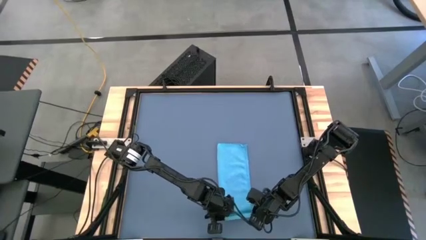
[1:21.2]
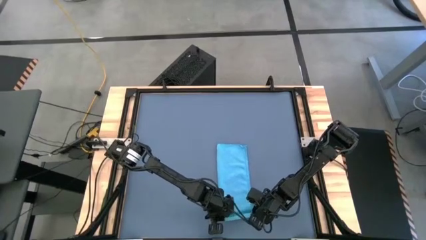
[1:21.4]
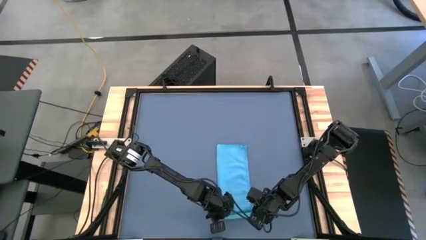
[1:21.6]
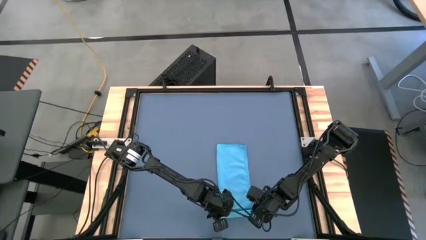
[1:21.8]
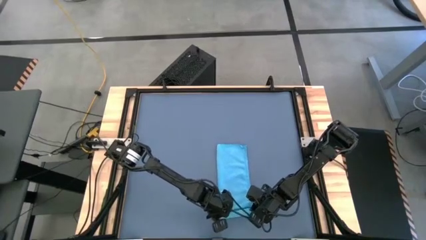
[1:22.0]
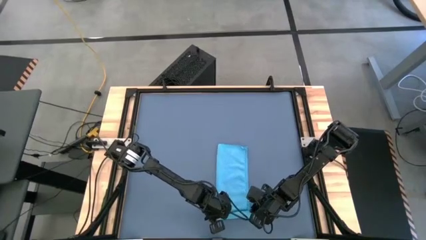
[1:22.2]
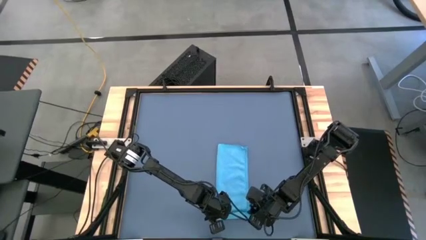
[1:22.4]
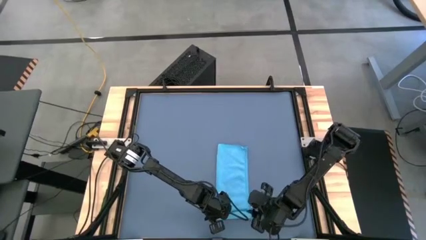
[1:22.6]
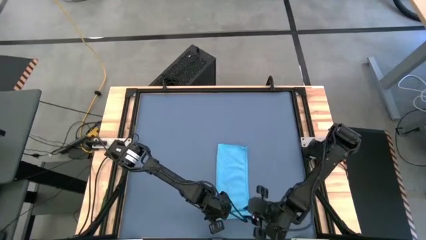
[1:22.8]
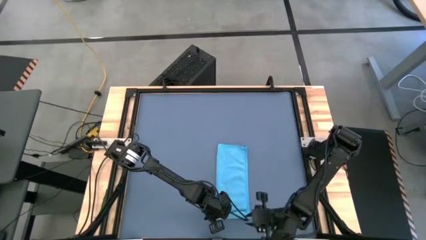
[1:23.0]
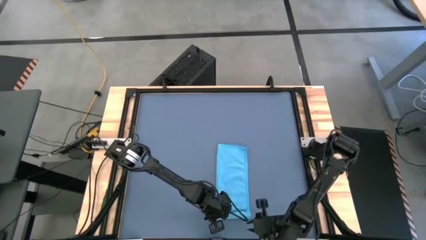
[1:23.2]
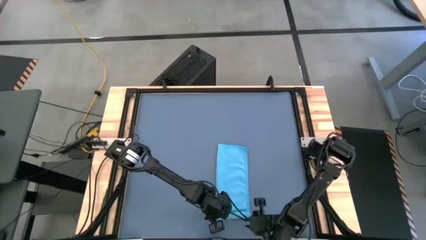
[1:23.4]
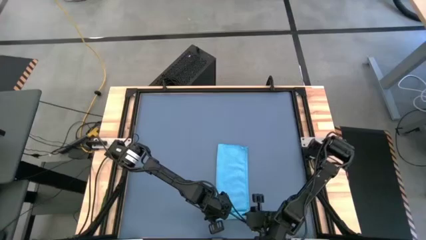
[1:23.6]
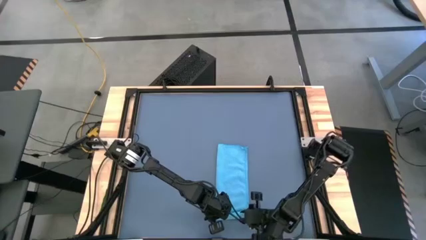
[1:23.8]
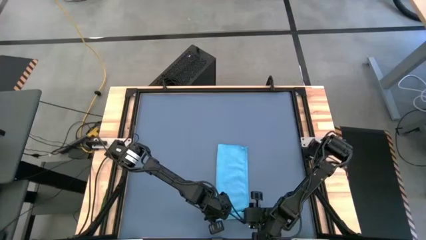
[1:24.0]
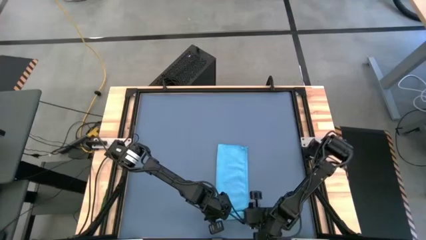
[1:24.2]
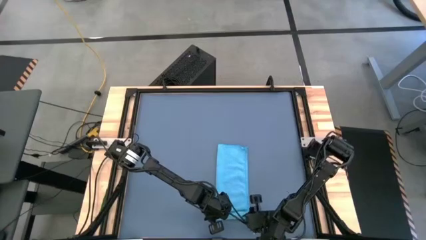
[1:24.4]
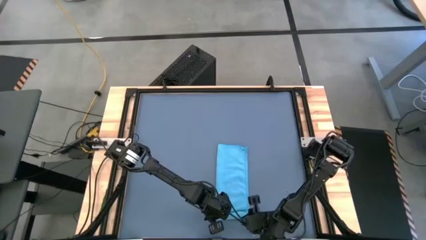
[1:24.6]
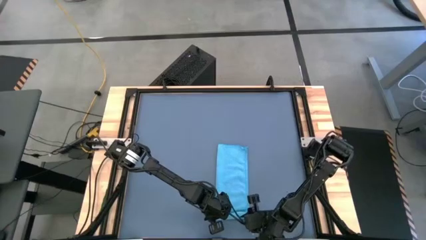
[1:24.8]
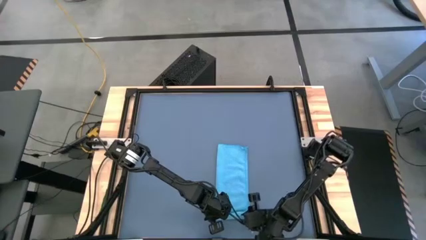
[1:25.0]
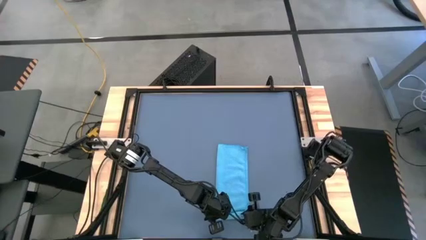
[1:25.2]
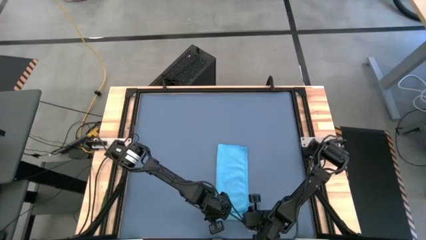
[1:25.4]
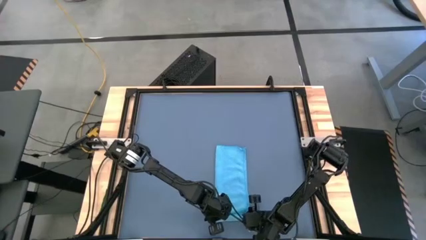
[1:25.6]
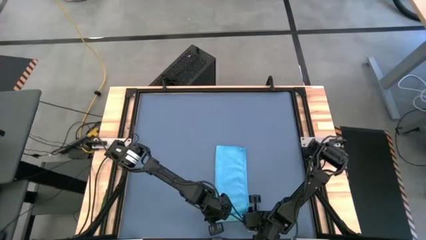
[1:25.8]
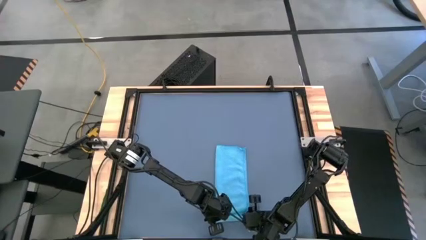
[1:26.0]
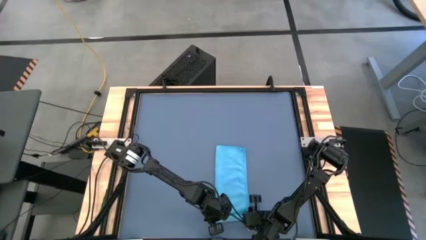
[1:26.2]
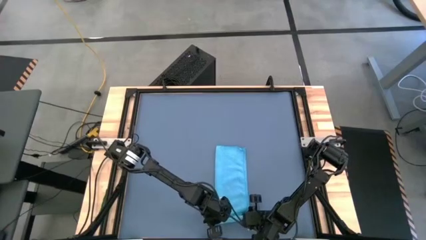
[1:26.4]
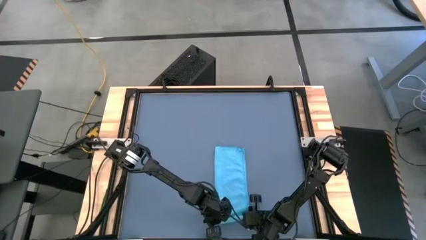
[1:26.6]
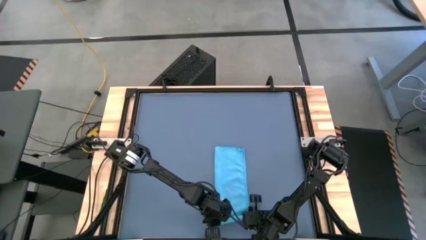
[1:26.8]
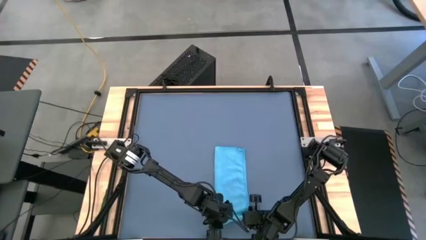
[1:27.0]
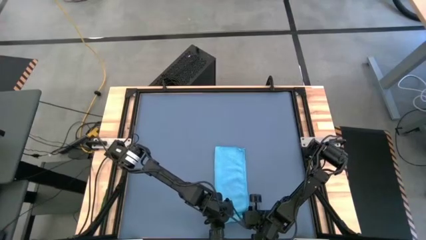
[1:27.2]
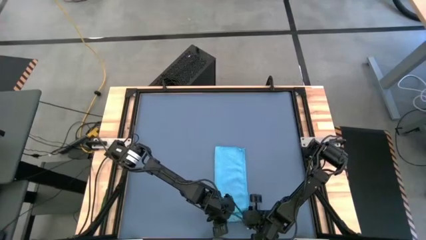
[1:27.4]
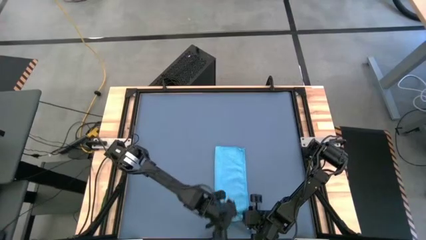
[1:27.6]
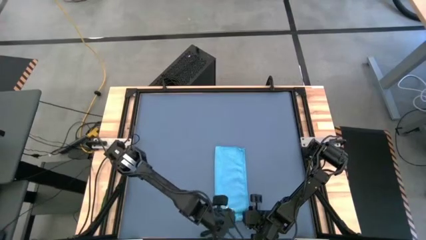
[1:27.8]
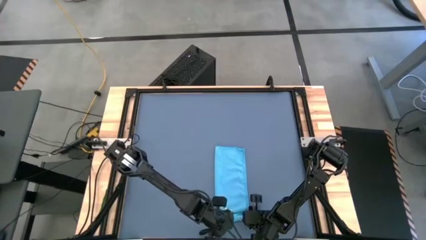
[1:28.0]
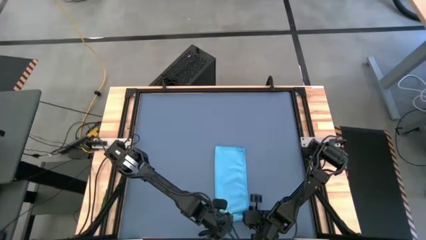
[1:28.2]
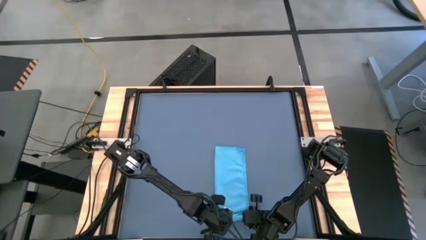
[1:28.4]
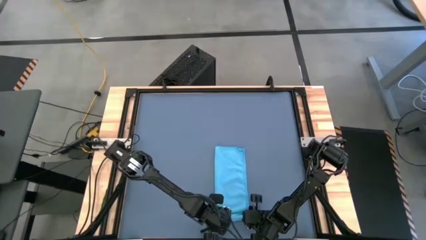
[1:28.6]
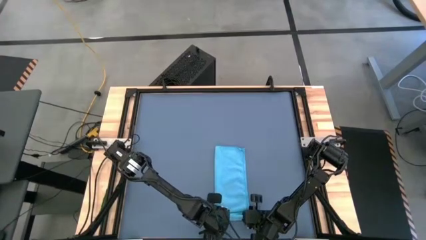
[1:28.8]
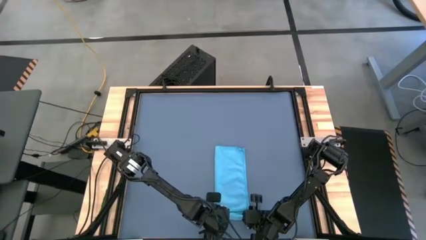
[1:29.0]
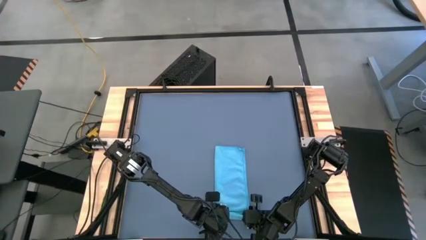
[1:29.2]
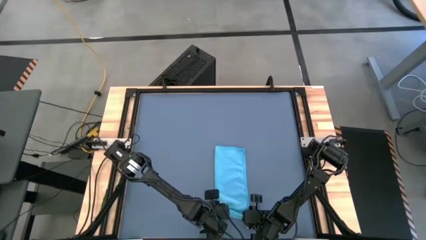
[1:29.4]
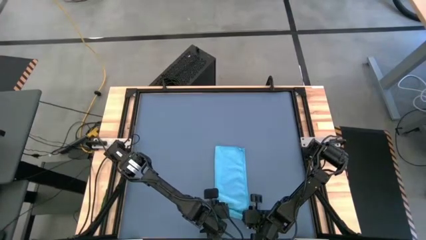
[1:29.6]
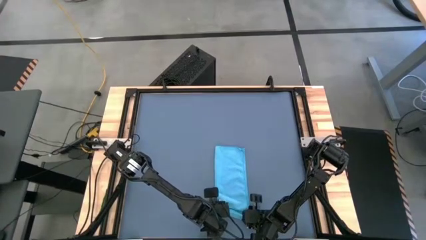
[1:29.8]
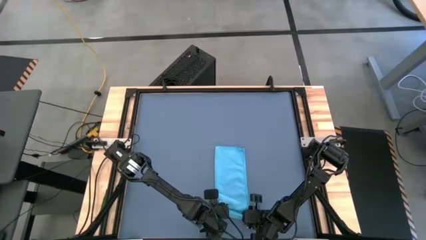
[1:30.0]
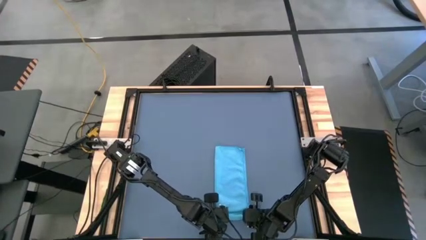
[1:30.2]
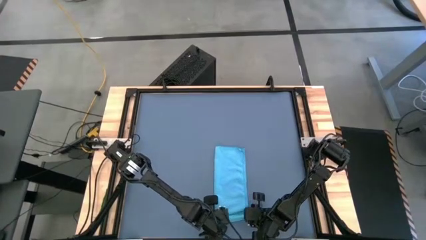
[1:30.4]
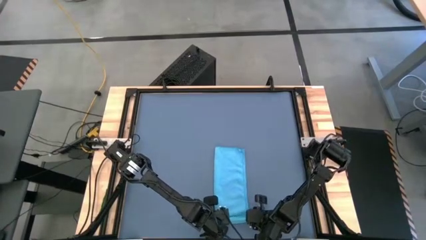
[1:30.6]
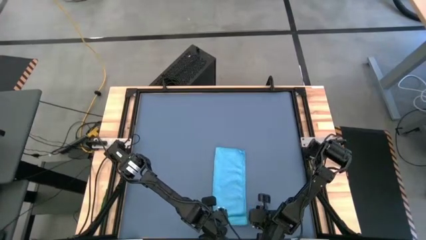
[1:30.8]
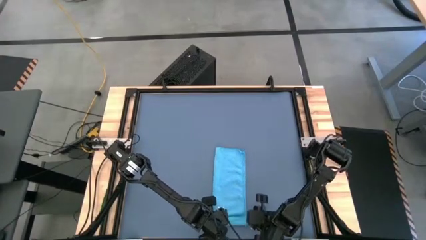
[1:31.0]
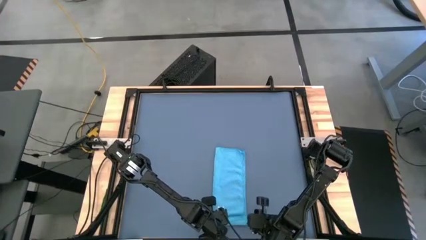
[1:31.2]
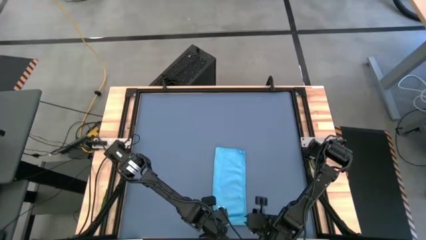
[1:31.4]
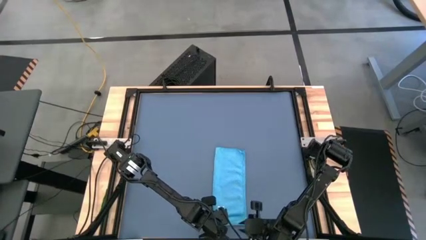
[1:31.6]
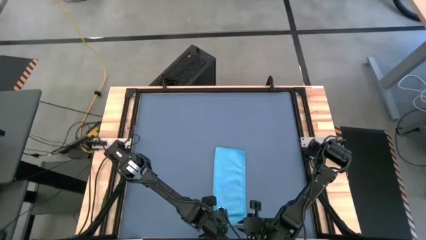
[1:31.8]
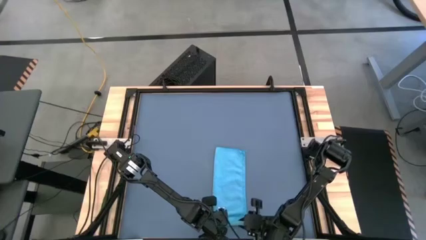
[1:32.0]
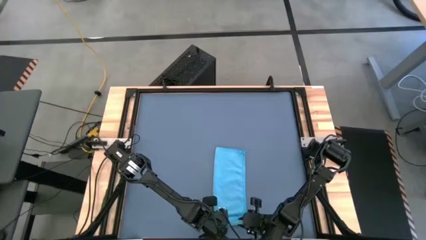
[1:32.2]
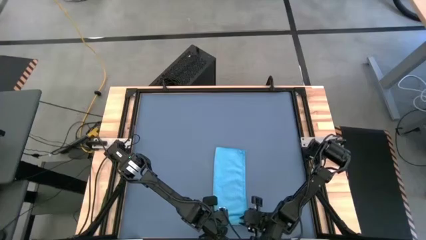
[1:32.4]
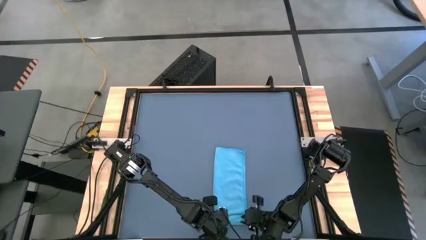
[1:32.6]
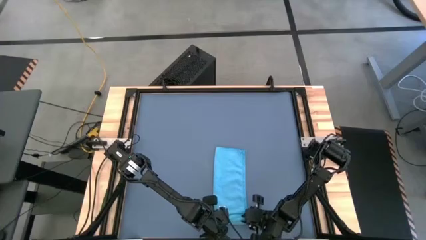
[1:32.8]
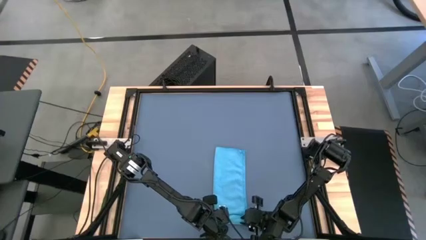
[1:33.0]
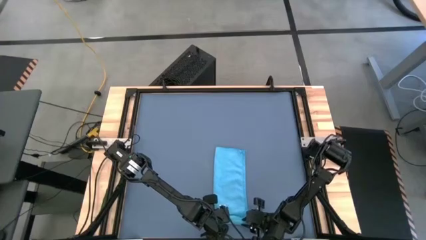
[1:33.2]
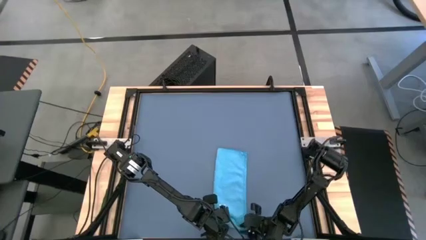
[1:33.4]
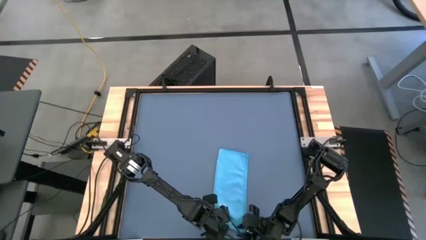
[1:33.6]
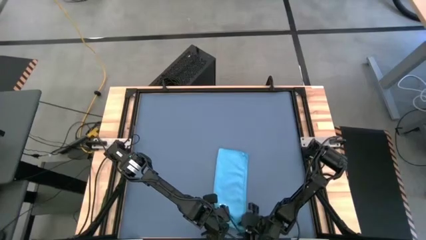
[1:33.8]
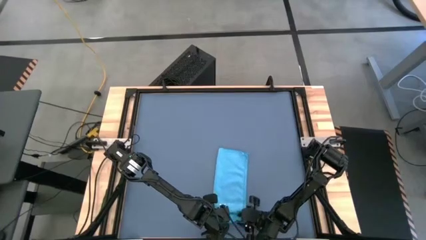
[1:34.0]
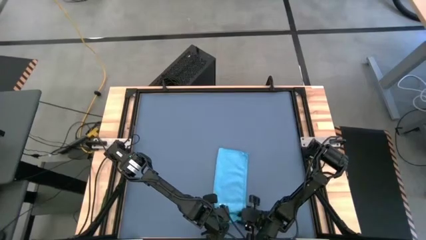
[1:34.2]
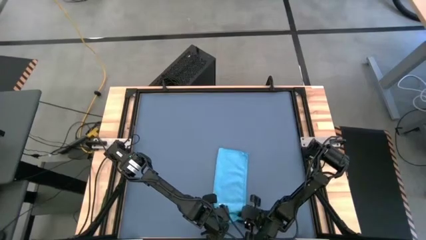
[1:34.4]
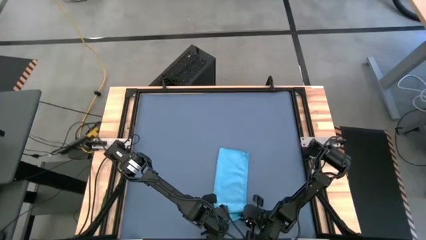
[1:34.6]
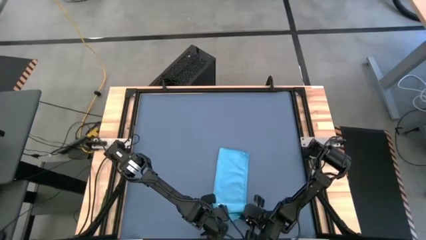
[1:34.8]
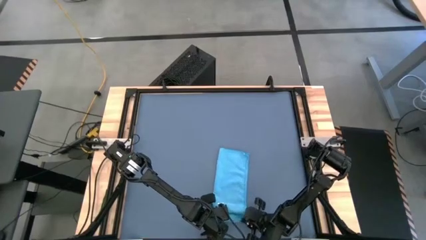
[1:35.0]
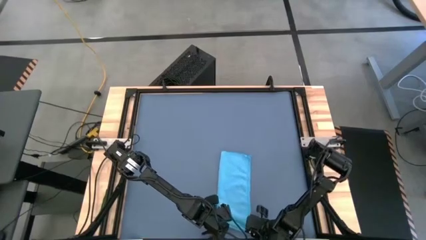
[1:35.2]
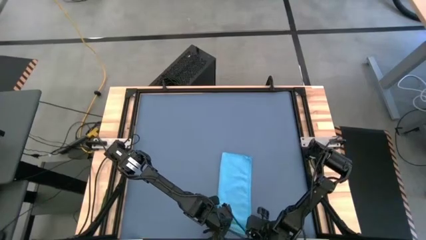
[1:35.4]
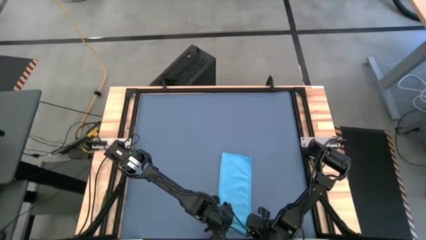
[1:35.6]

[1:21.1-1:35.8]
Task: Roll towel
Roll the blue microfiber towel

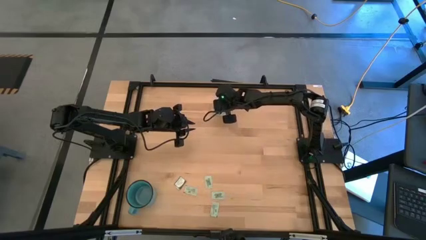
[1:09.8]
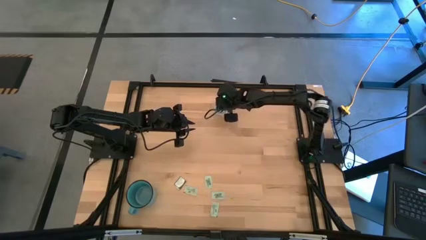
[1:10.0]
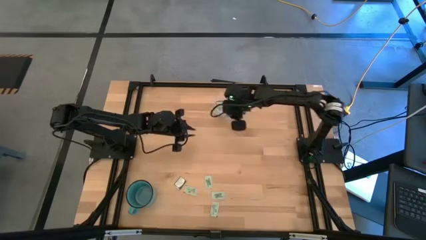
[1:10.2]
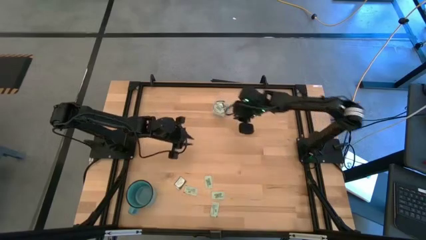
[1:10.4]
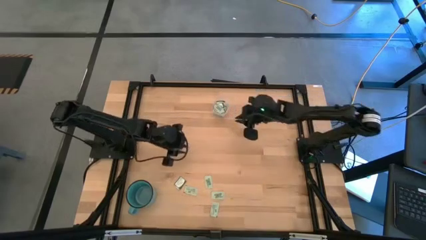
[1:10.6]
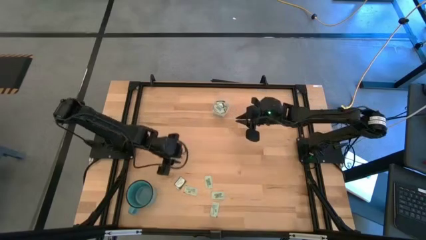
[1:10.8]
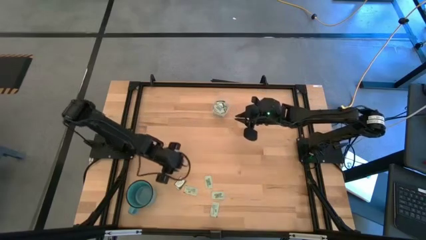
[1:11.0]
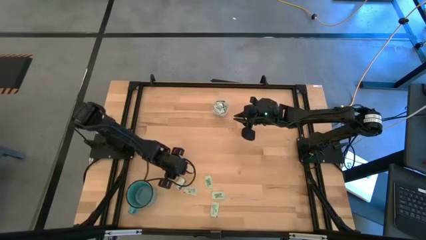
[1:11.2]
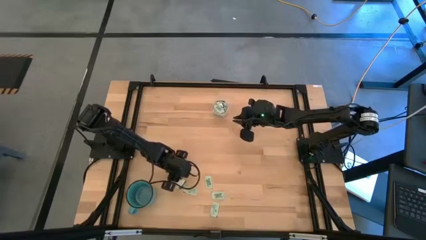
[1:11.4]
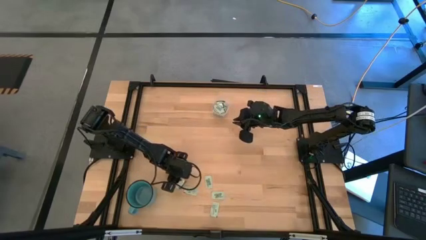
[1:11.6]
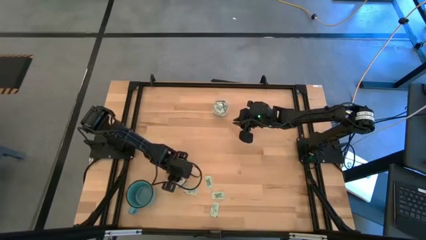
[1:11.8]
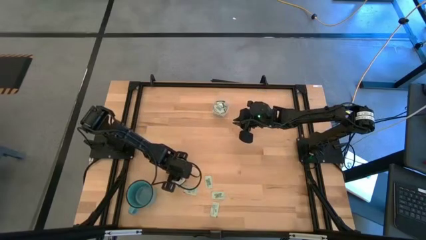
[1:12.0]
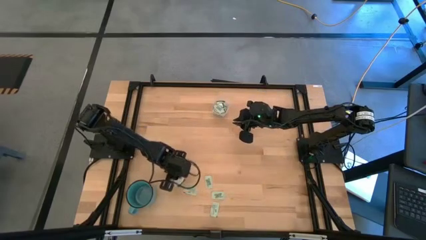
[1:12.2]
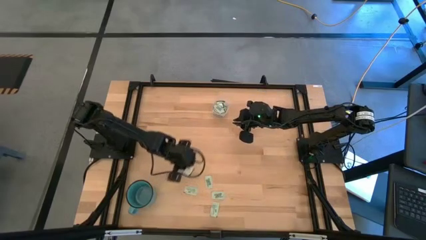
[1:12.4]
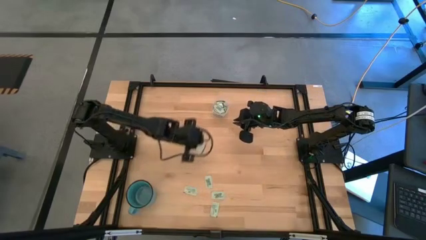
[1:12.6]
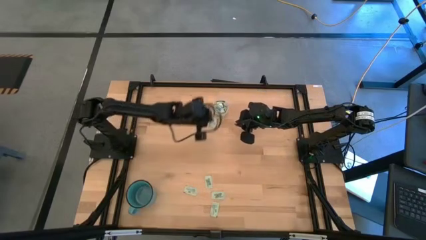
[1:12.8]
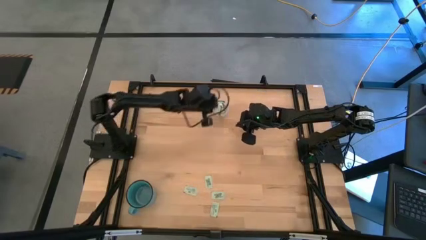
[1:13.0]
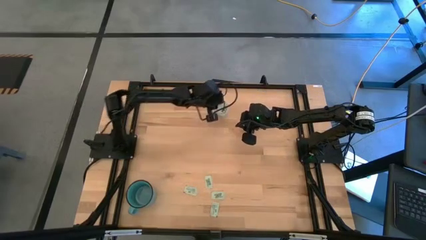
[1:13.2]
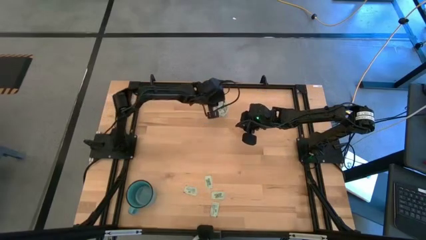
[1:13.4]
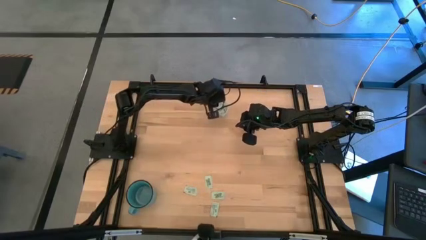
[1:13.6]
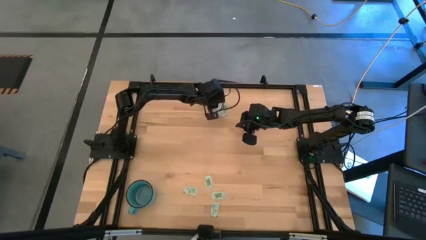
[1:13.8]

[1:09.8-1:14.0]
Task: Pick and place items into bin
Put the green stevia packet into the transparent bin
